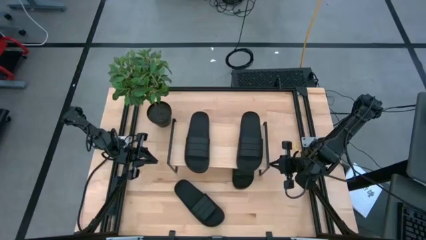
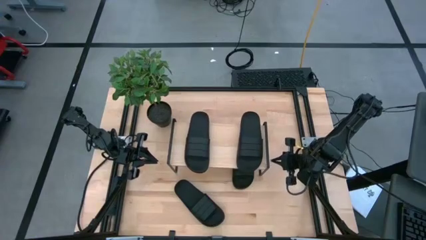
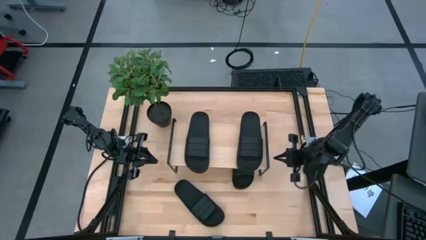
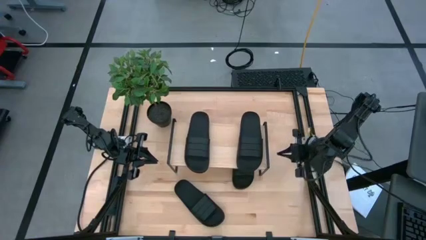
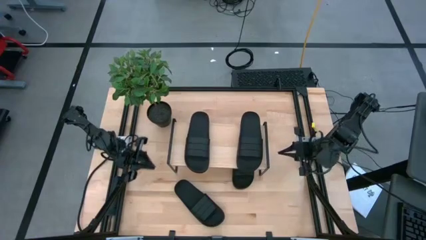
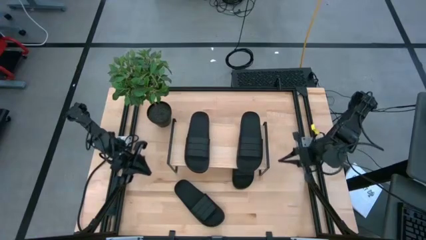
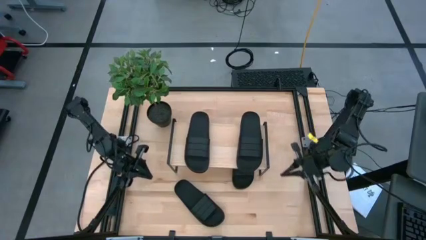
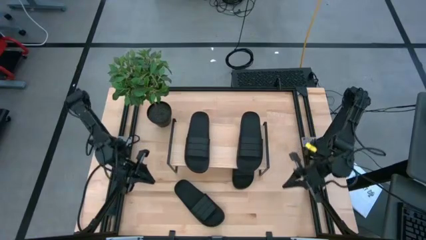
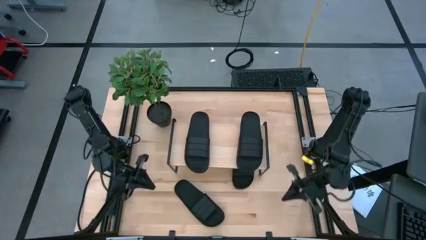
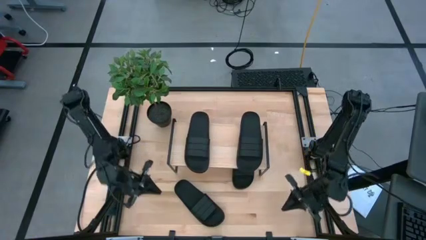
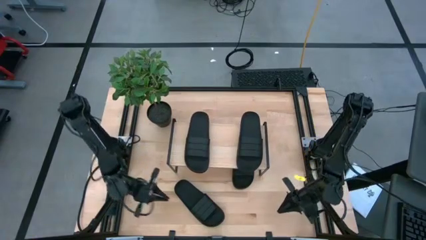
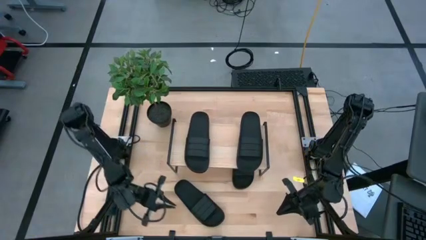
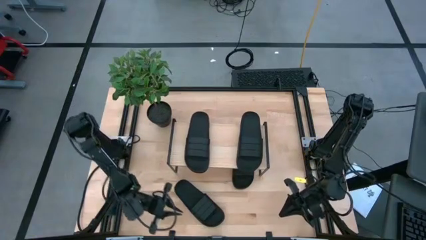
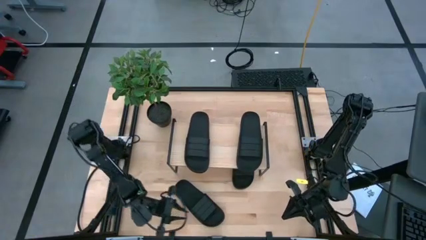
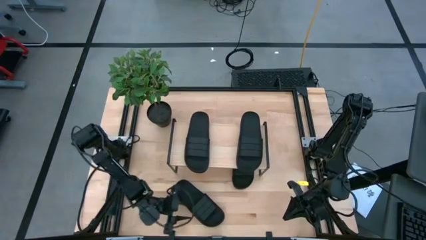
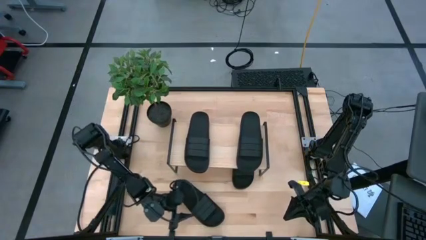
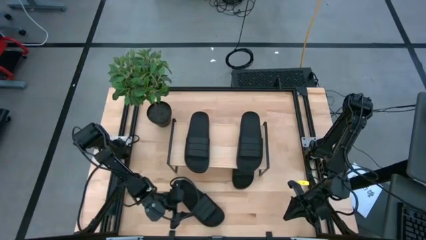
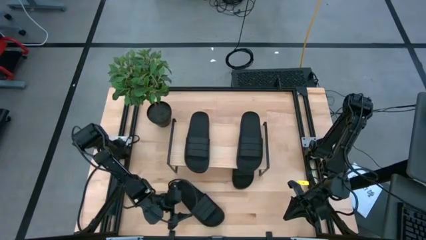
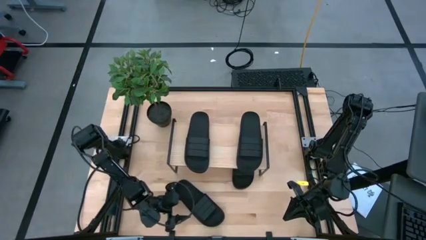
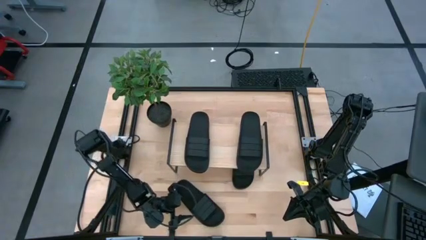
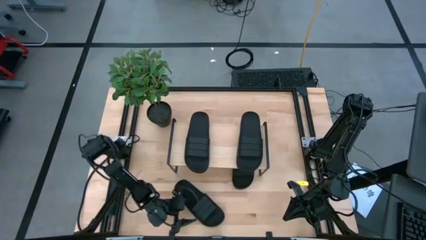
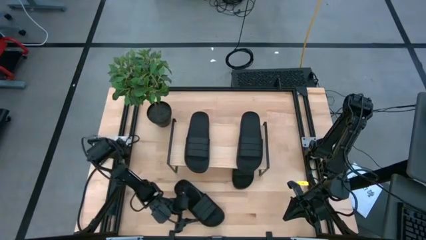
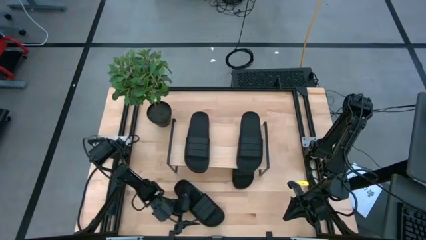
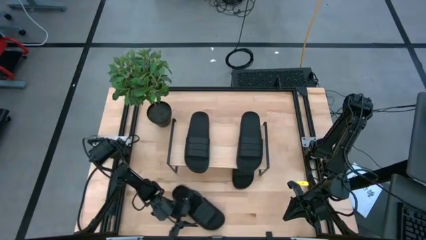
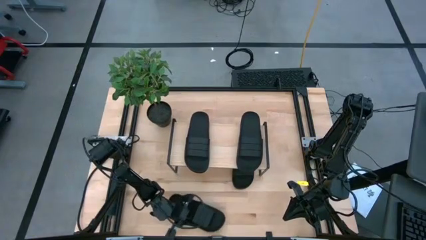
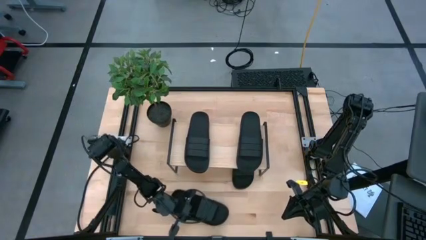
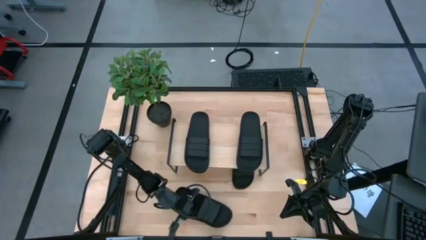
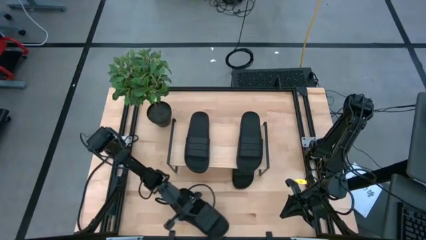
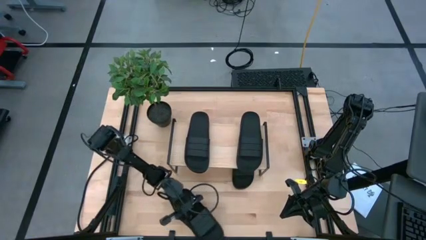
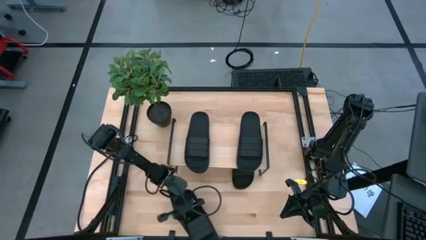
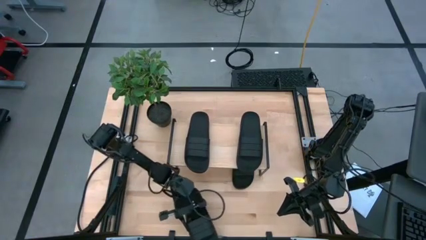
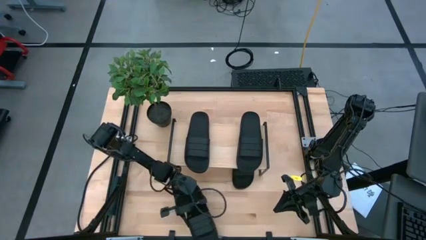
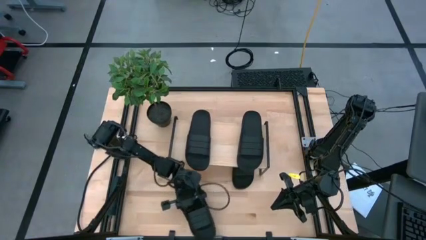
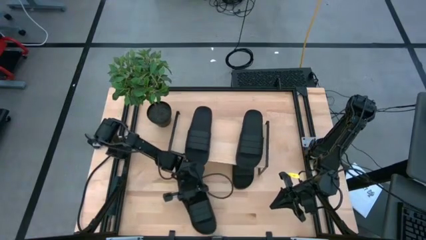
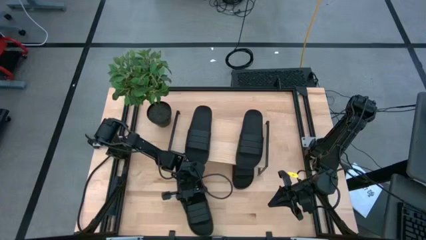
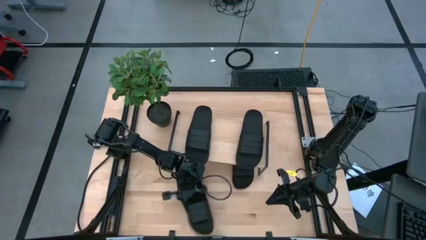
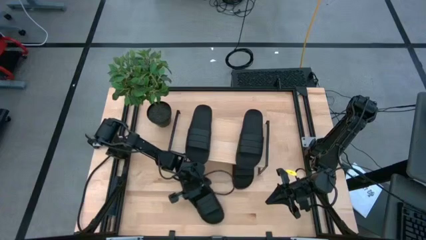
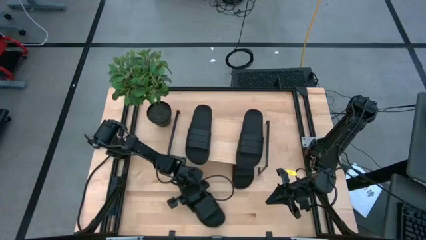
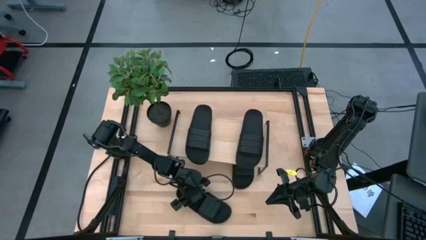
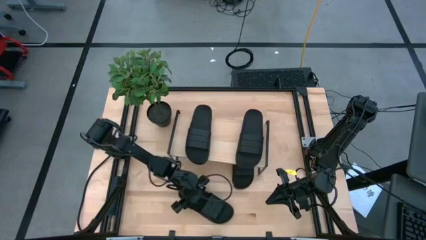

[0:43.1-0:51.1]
Task: Pick and place slides into the shelf
Put the black slipper under the shelf

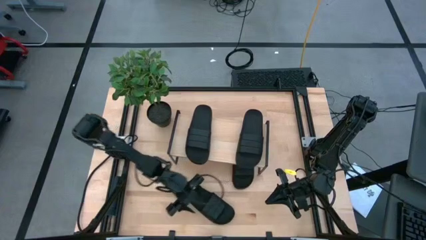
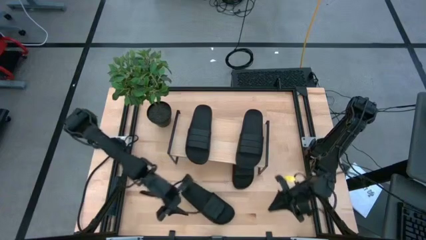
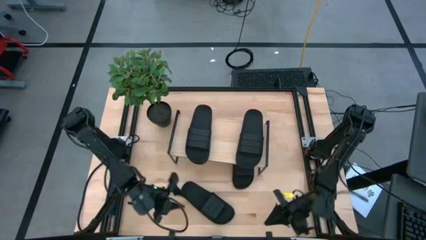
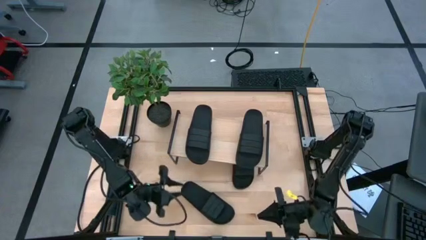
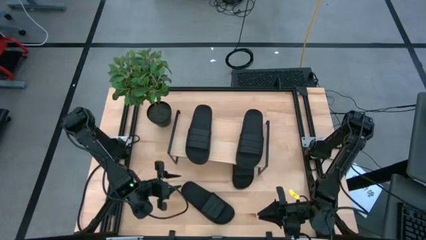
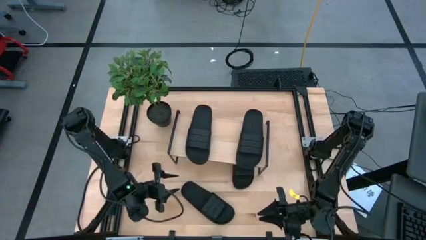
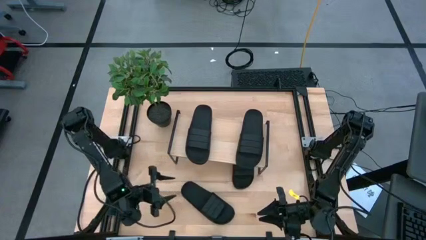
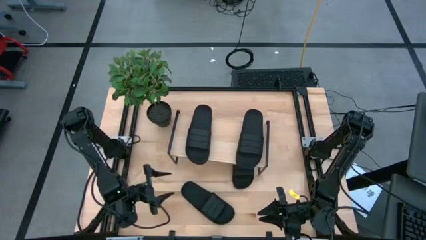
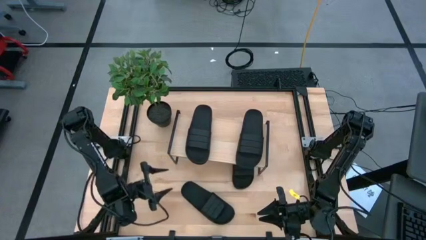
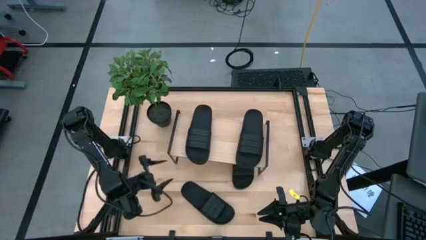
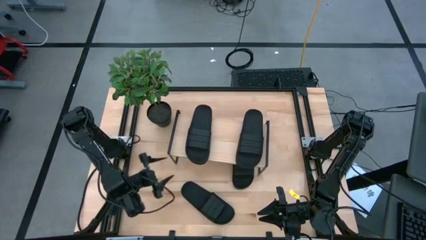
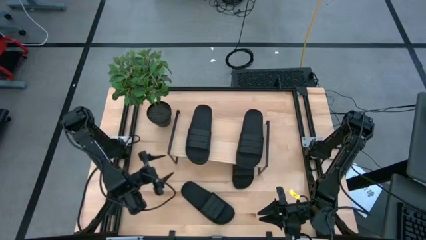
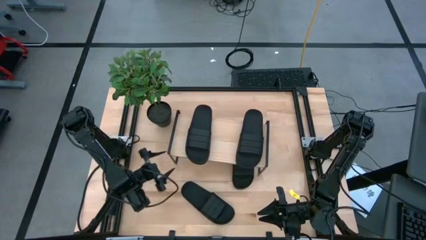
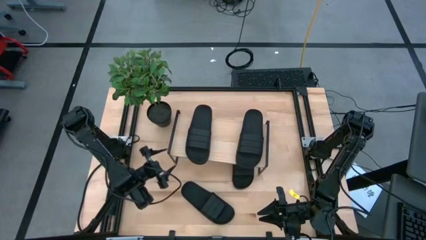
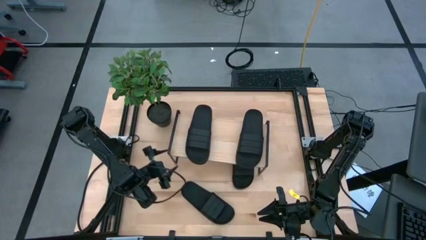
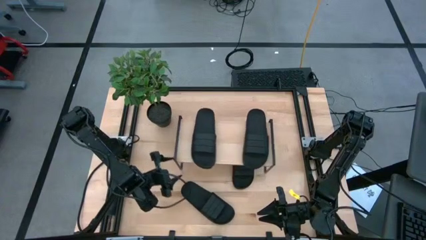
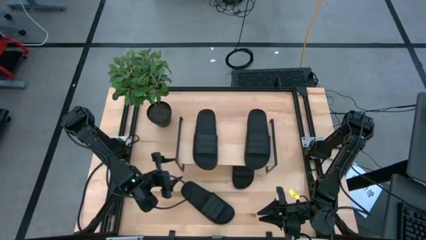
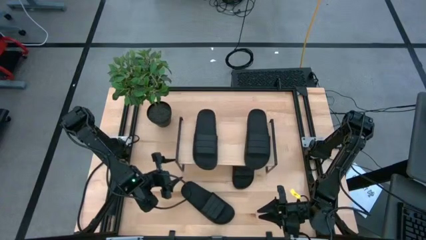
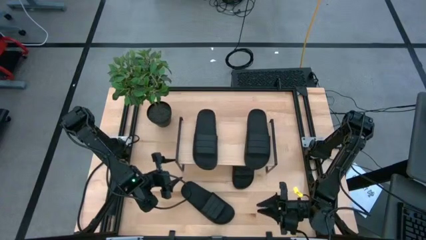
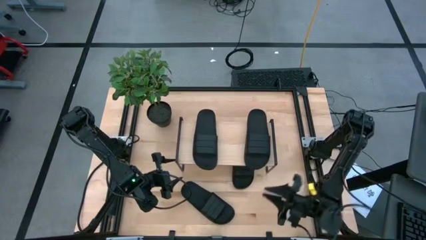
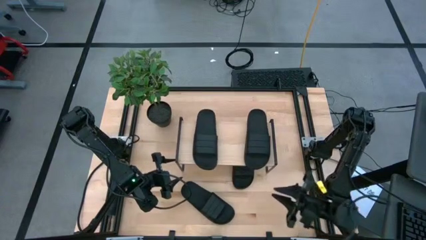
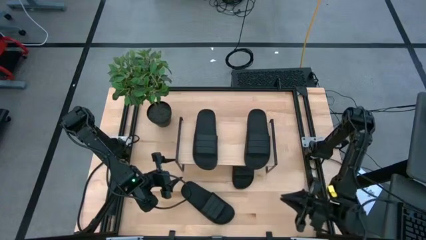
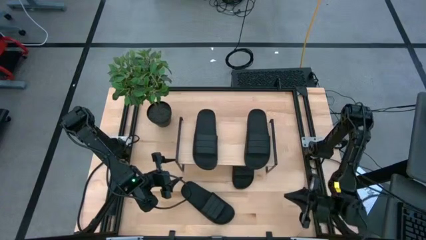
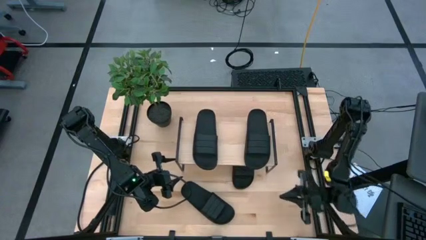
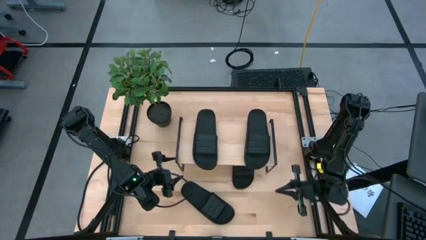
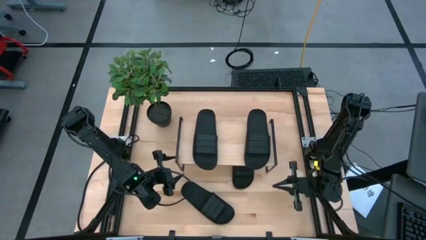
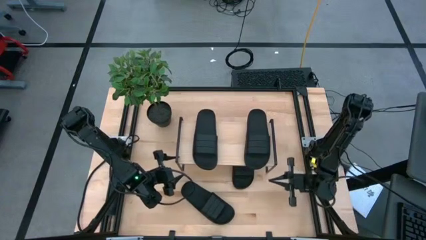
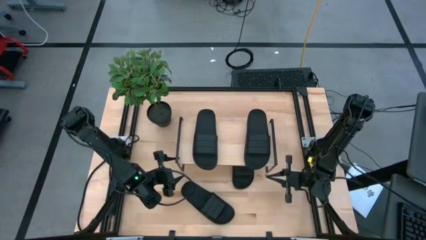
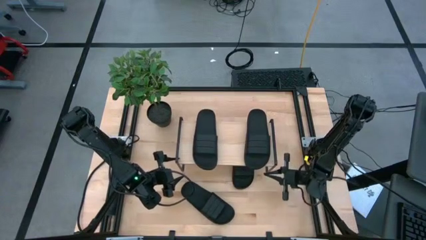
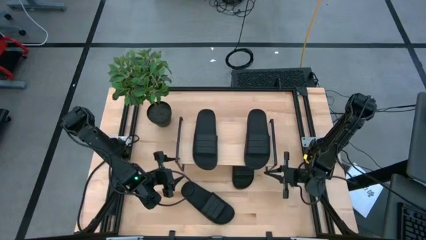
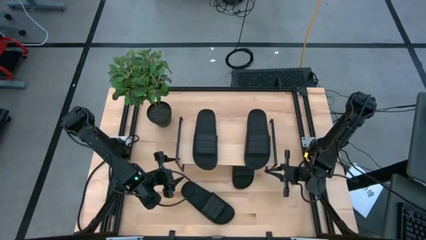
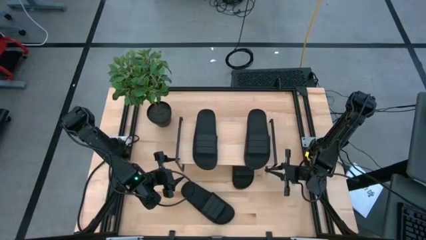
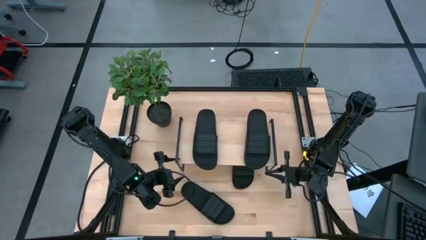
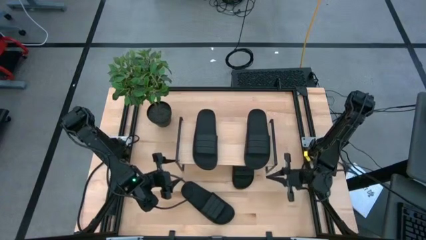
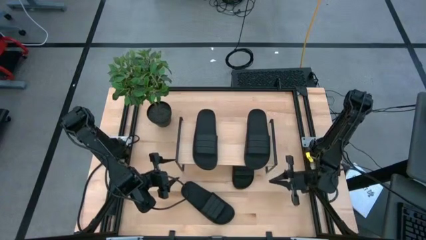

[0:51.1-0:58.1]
Adjust the shelf

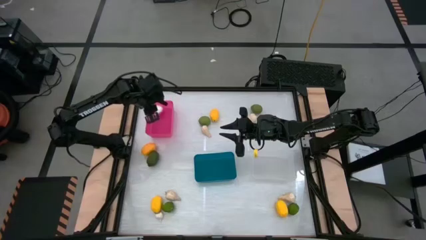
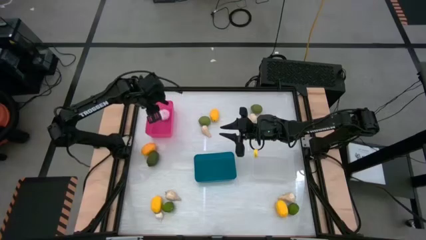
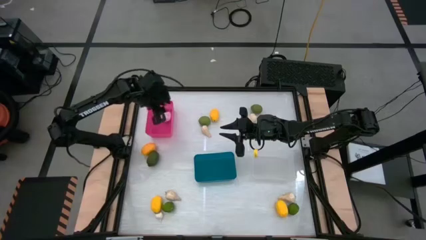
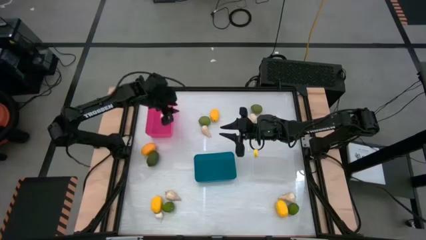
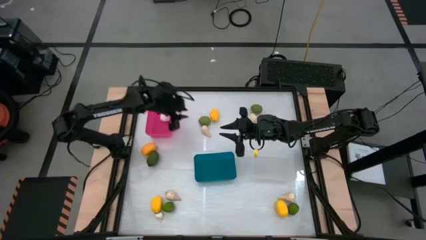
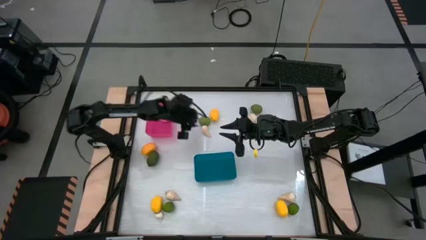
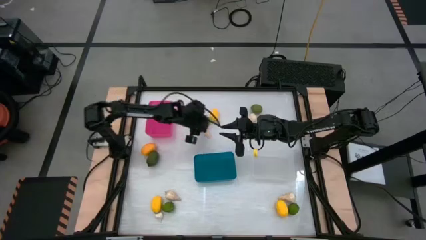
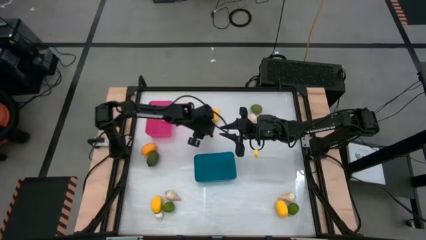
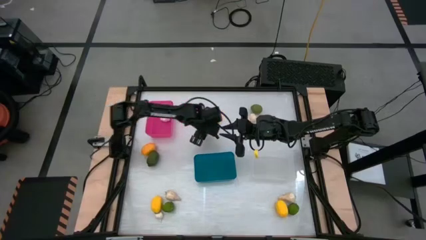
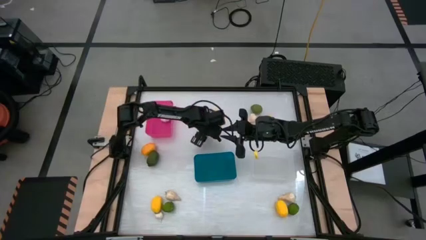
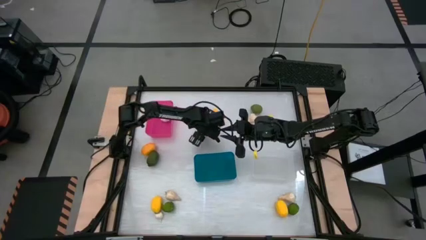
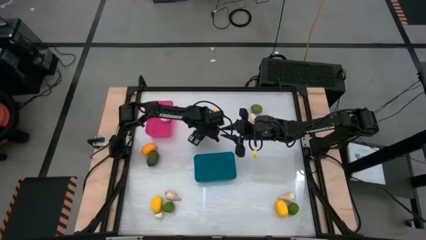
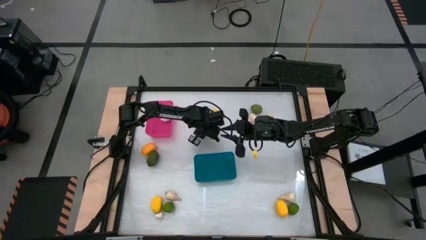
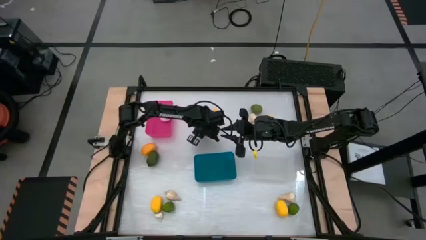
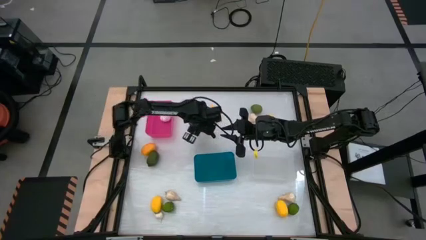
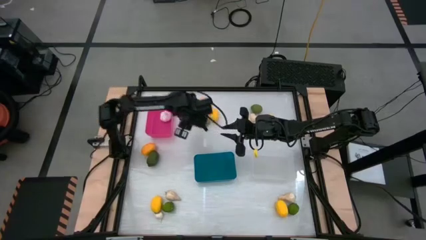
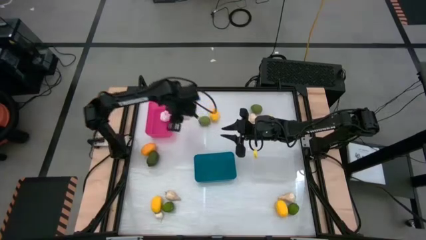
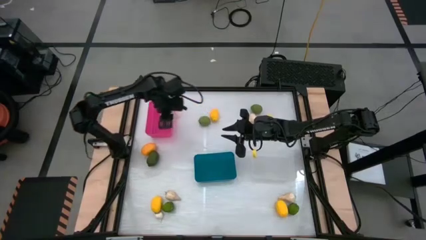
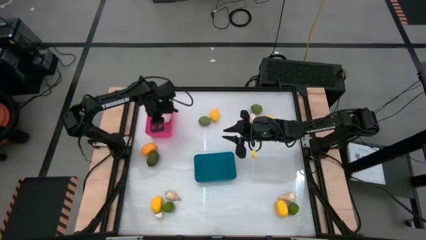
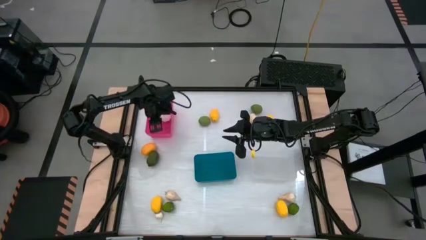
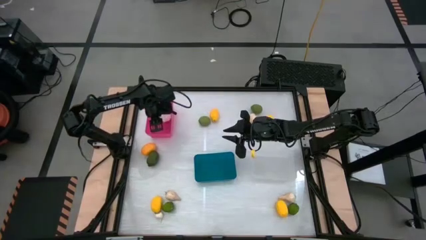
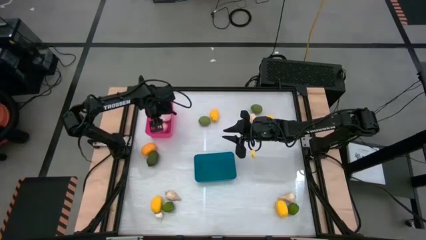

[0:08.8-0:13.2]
Task: Sort produce into baskets
Put the garlic into the pink bin
